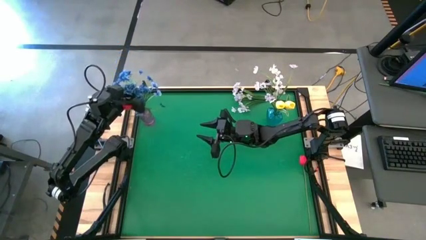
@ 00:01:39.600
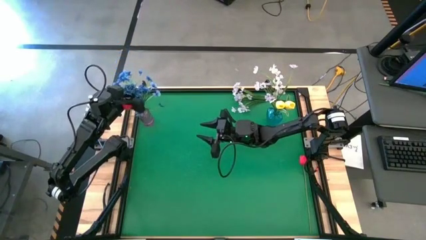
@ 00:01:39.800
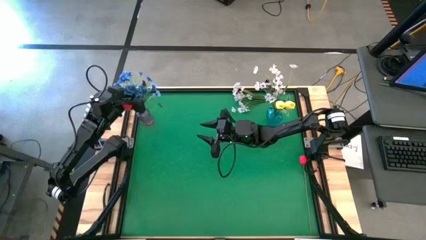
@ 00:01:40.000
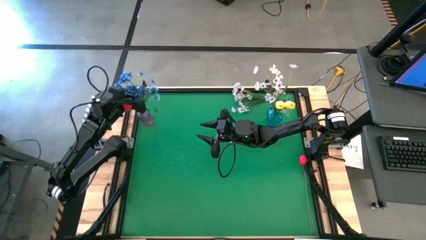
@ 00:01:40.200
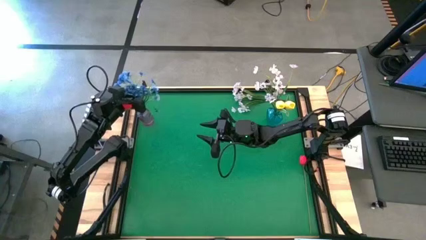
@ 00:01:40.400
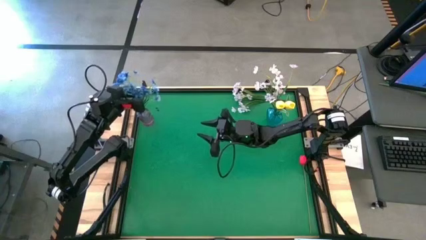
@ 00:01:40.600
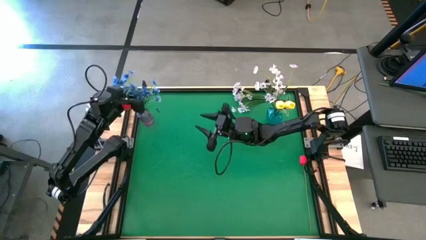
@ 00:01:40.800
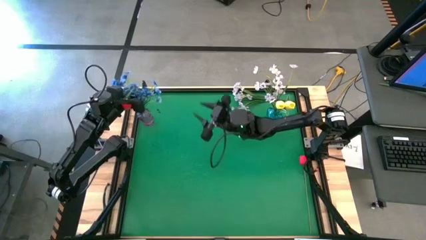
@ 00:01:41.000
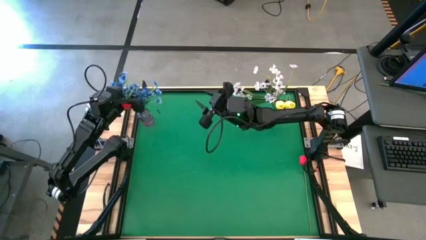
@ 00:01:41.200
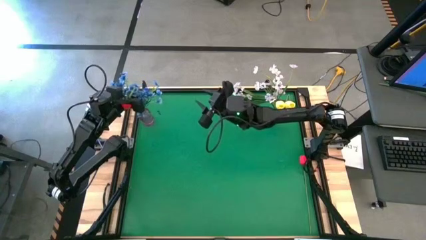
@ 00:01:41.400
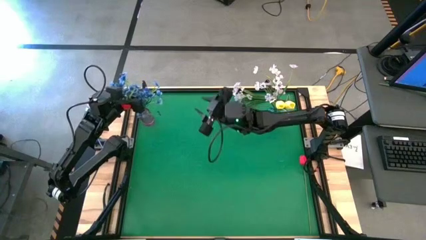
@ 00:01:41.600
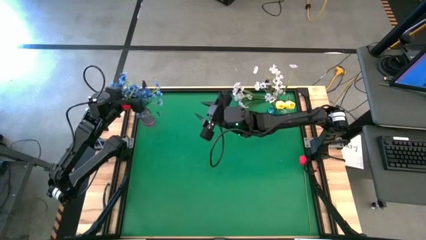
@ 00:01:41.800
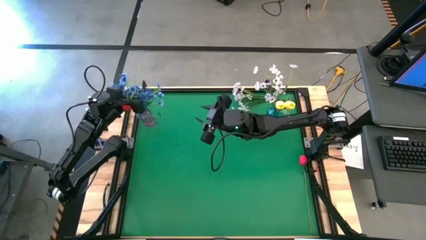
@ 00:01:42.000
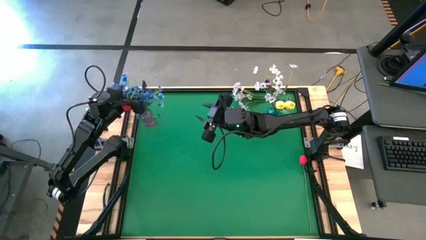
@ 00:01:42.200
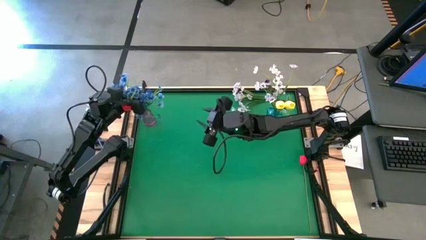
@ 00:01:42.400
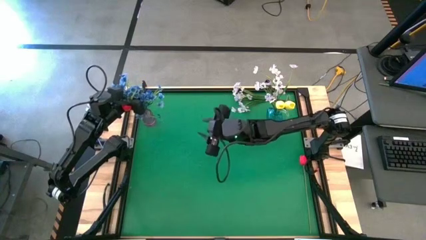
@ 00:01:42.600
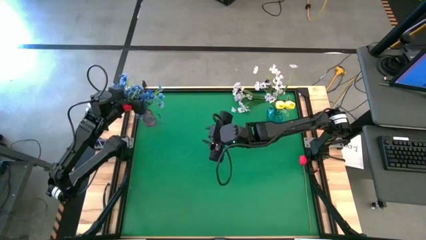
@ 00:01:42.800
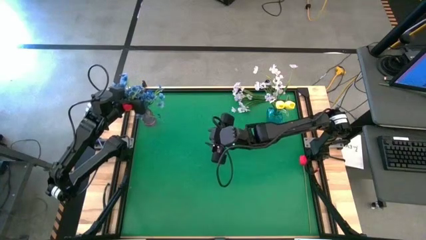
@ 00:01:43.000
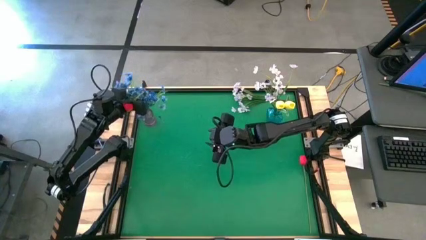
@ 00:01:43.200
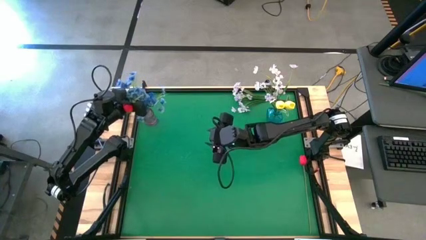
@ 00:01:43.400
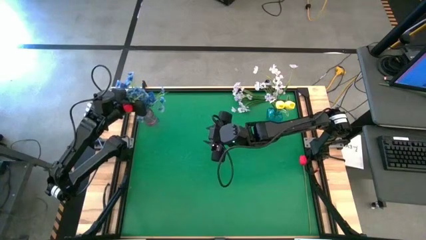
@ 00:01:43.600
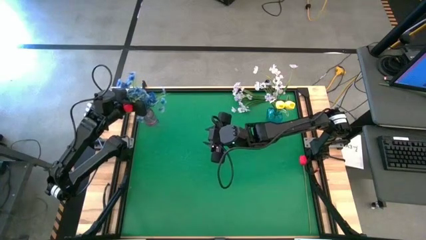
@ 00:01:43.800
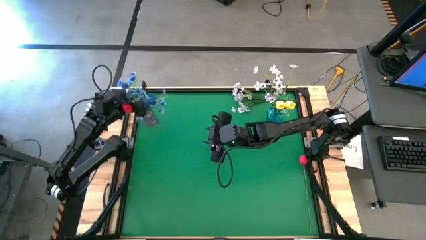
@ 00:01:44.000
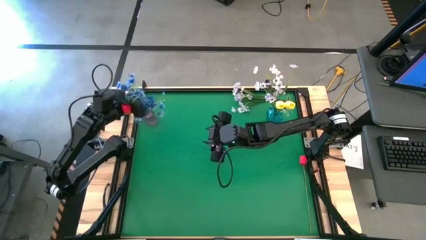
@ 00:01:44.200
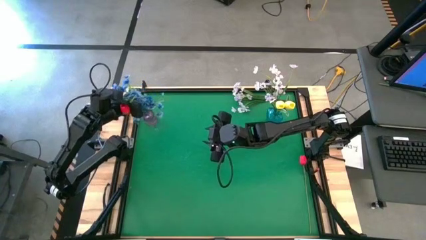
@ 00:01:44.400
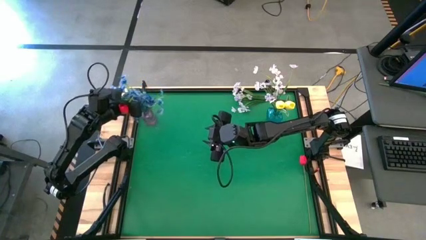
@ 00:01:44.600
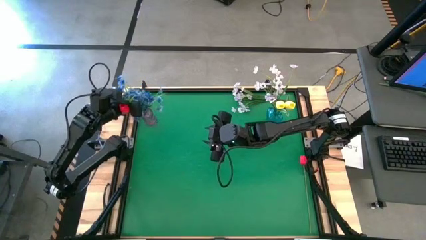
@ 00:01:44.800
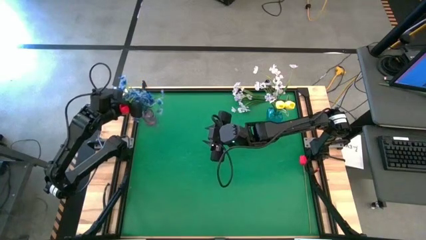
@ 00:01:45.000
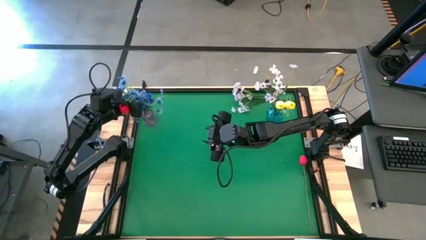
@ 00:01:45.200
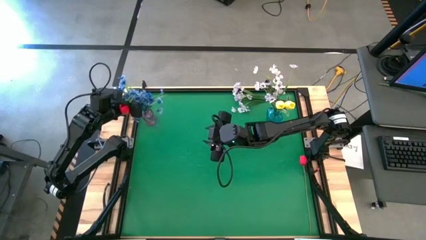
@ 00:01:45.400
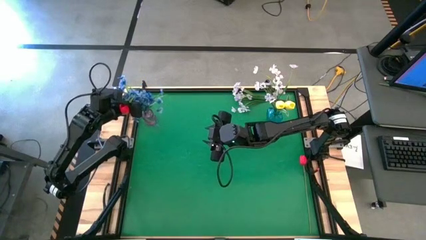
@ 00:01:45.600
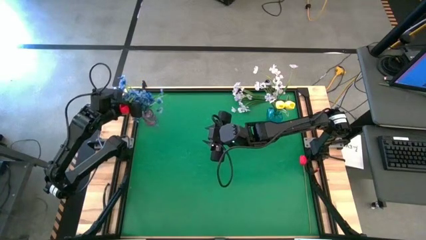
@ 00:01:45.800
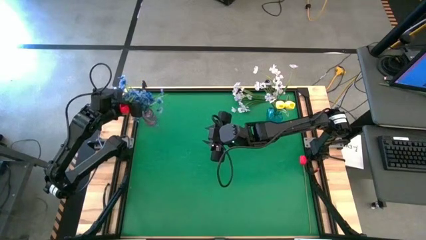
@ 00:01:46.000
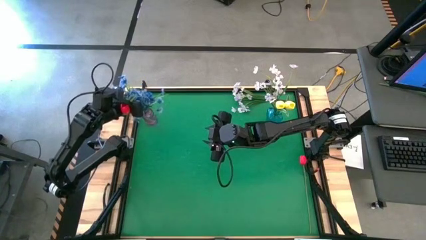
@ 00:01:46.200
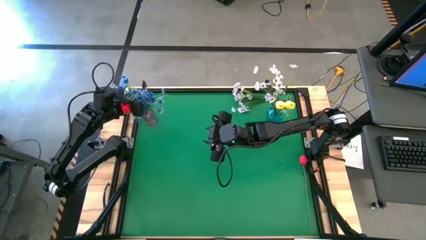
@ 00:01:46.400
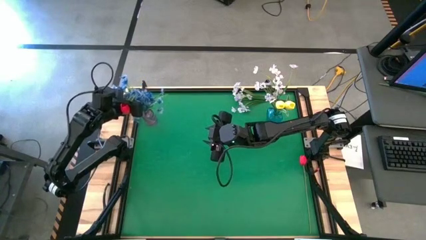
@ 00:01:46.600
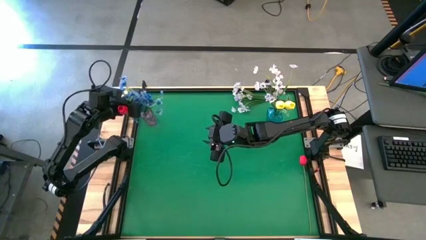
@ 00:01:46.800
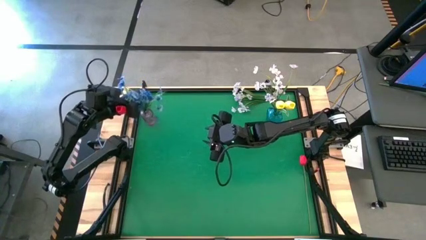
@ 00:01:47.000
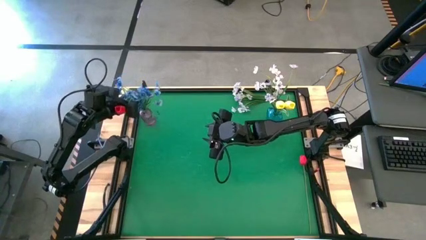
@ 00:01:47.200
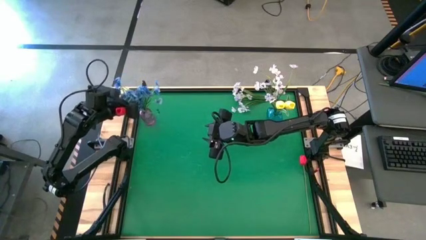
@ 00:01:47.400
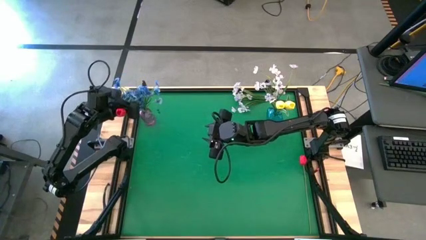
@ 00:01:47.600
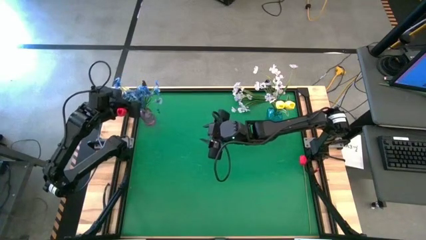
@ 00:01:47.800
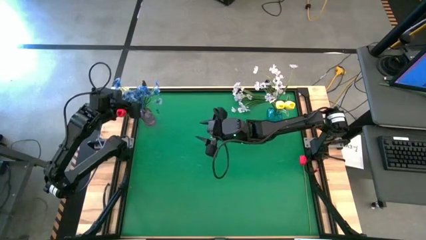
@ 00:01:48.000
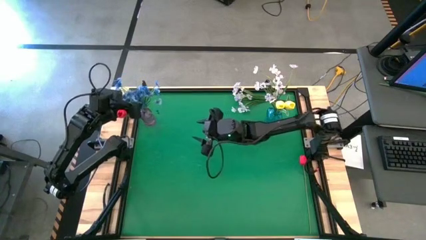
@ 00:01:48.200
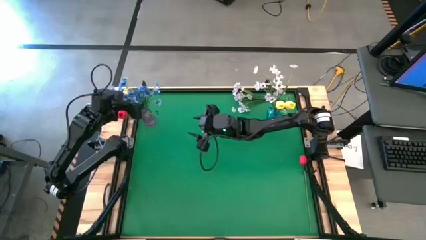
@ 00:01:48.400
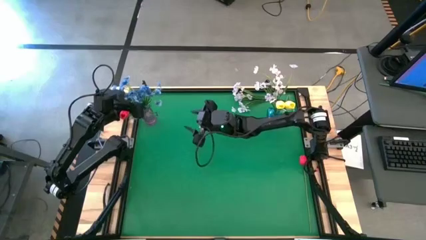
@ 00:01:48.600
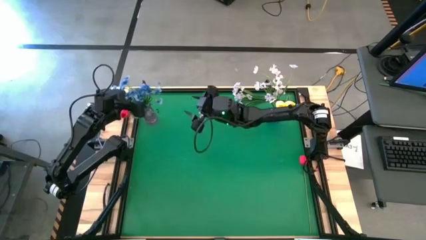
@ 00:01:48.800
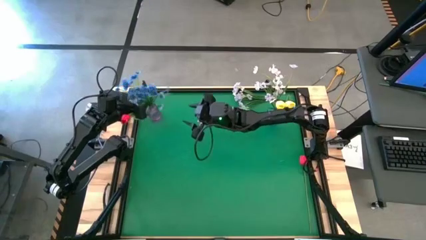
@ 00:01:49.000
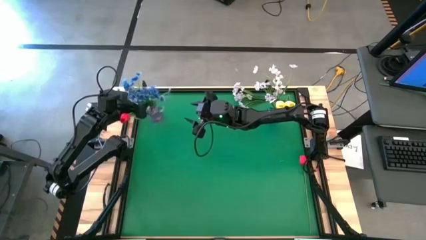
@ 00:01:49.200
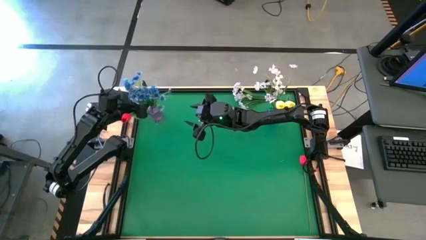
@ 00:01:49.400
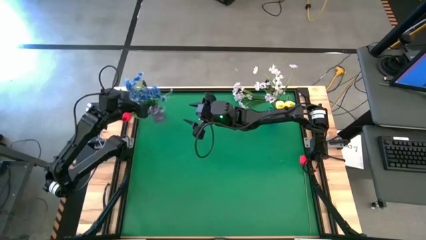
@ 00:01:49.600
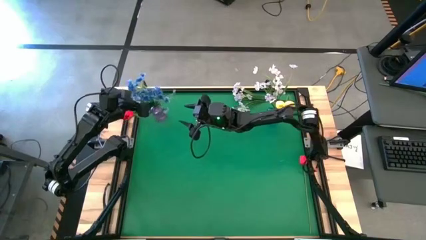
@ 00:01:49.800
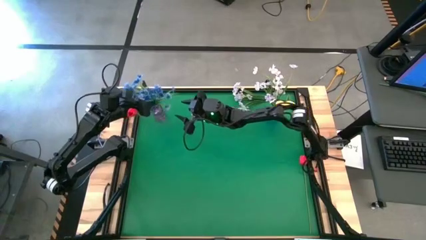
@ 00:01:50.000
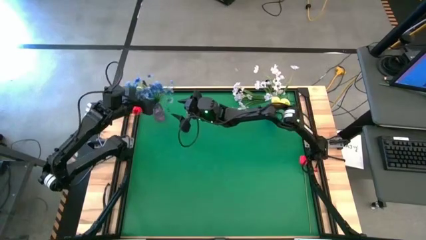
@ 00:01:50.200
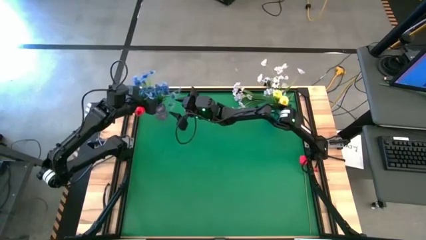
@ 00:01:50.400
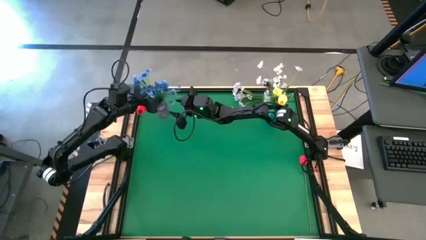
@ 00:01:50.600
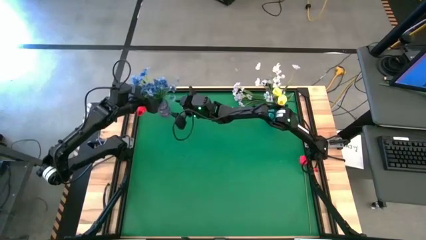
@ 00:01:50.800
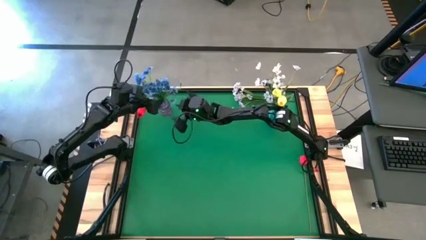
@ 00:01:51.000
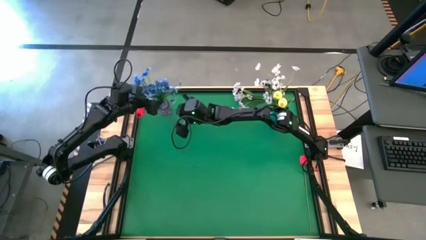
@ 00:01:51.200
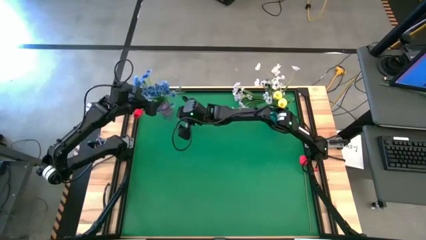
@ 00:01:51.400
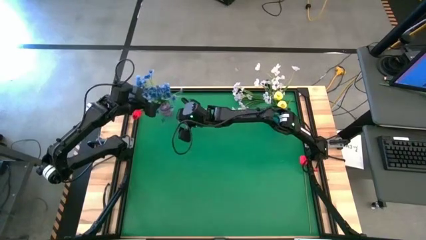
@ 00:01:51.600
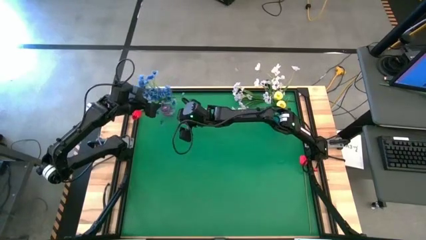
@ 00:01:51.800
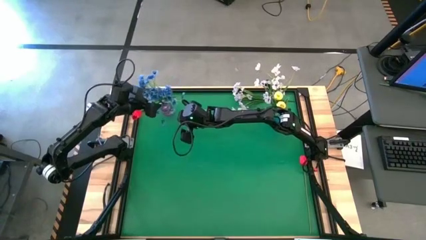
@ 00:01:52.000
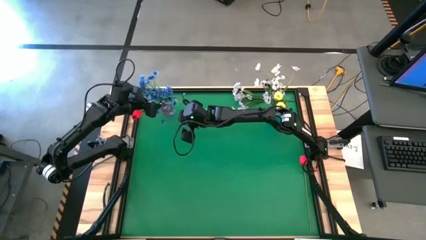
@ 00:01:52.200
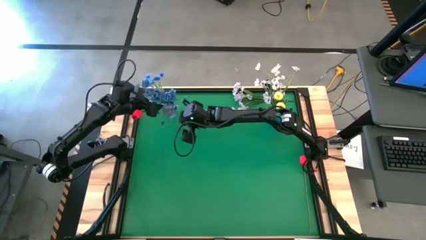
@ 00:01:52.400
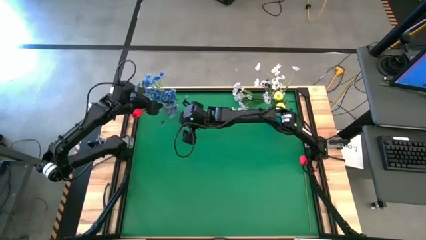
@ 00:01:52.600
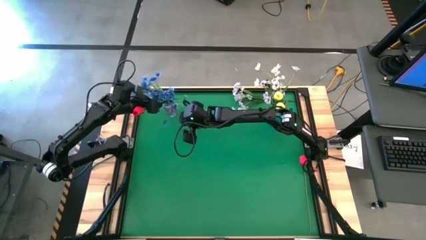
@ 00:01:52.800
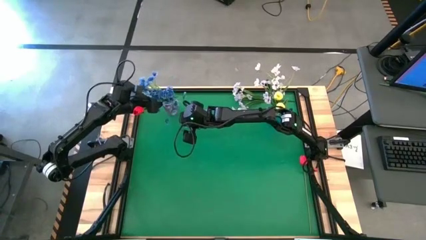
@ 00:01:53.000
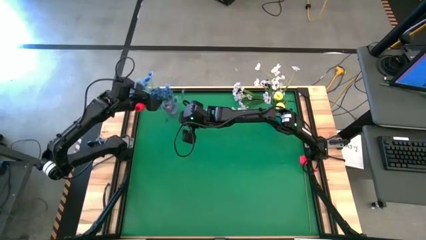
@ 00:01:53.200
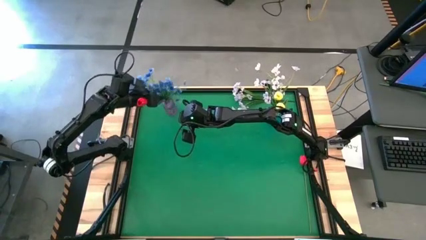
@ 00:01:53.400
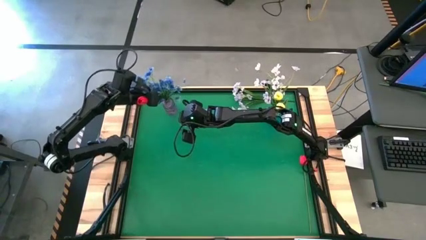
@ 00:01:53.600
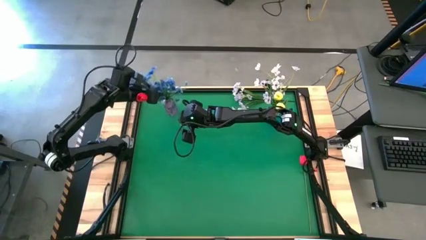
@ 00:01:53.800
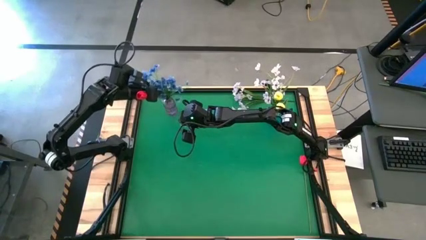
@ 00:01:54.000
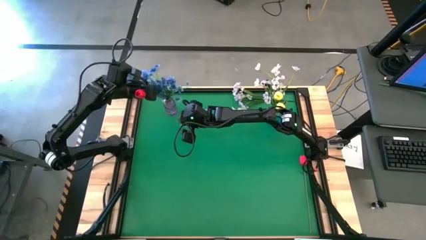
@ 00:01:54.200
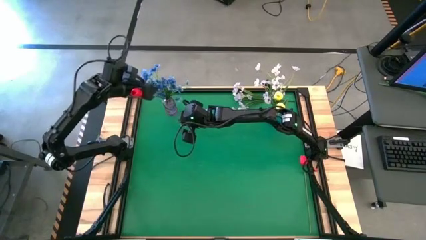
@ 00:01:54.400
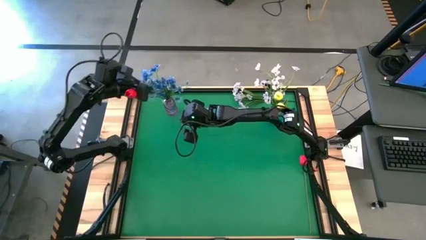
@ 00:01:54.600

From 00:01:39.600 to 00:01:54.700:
Task: Sort flowers into vase by color
Put the blue flowers into the purple vase
